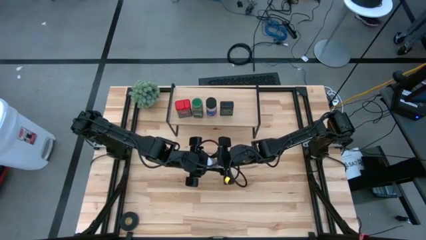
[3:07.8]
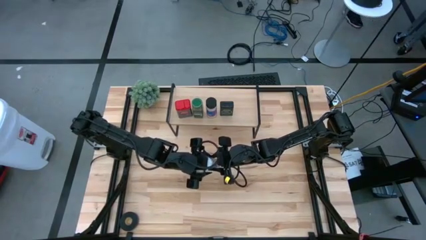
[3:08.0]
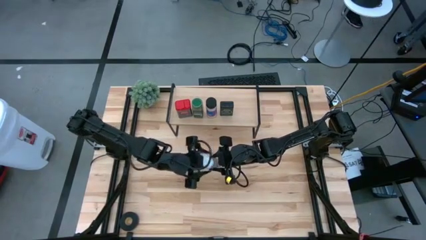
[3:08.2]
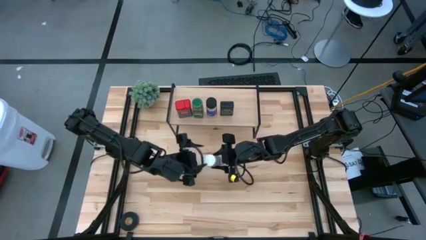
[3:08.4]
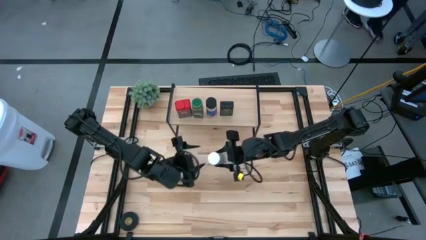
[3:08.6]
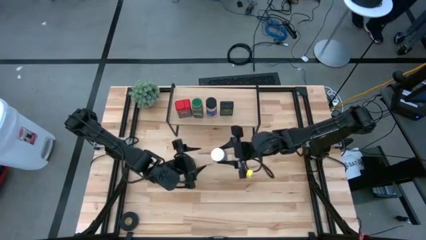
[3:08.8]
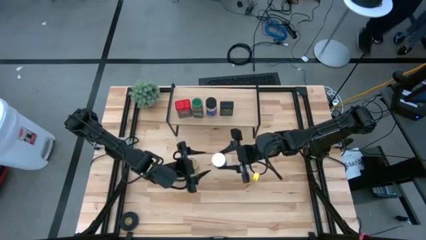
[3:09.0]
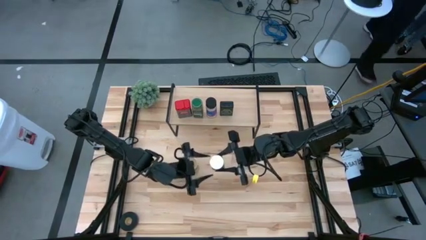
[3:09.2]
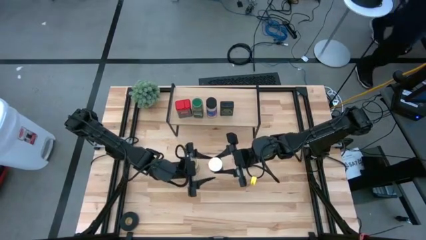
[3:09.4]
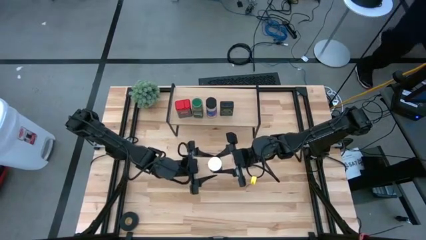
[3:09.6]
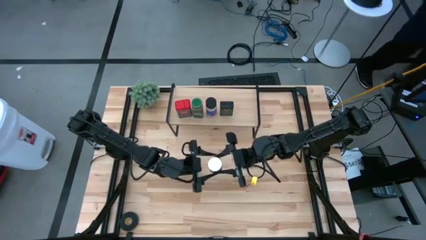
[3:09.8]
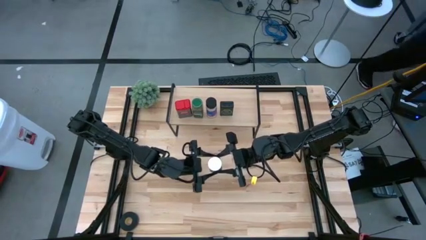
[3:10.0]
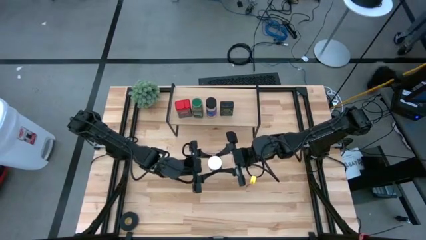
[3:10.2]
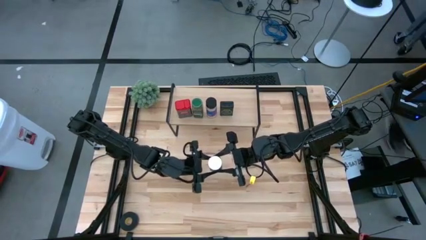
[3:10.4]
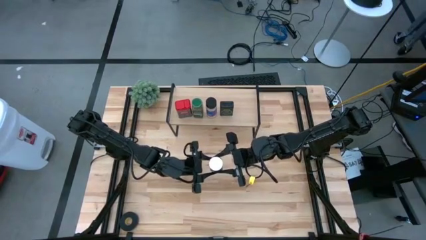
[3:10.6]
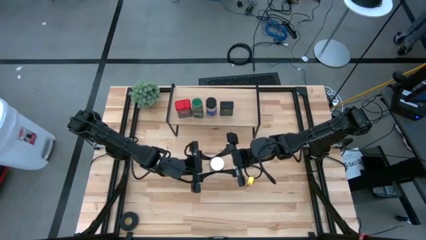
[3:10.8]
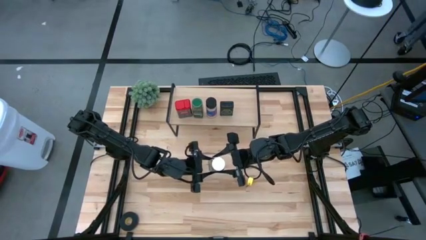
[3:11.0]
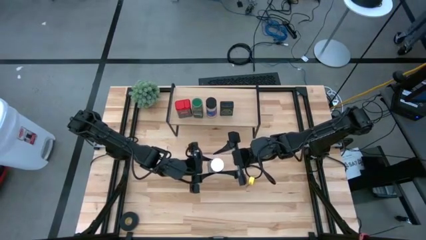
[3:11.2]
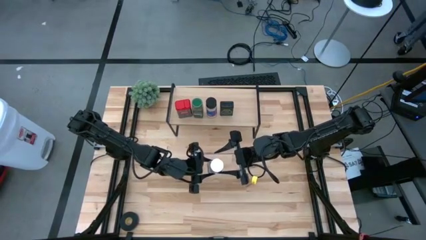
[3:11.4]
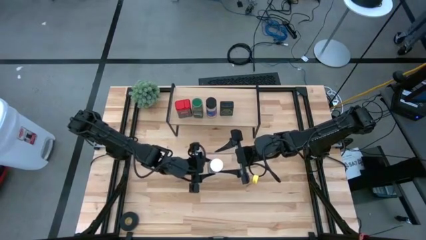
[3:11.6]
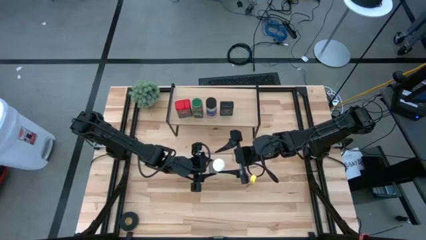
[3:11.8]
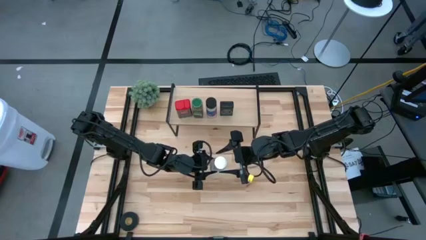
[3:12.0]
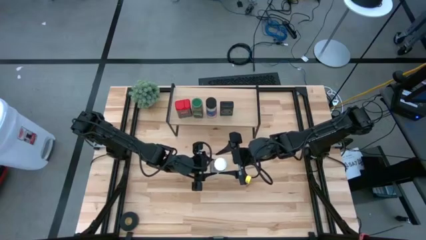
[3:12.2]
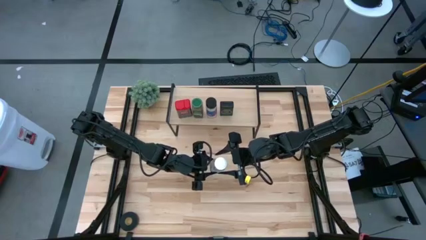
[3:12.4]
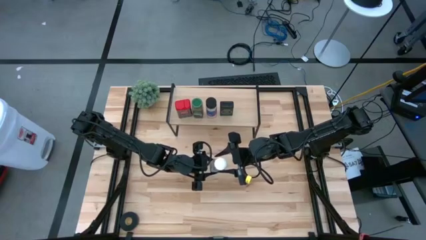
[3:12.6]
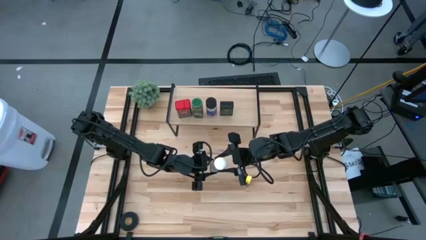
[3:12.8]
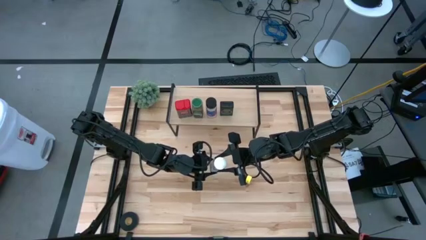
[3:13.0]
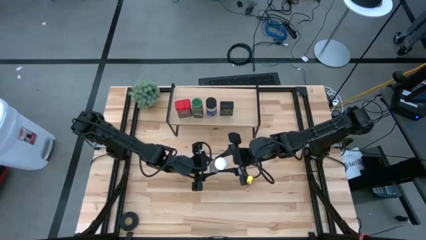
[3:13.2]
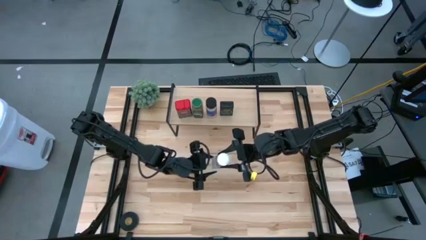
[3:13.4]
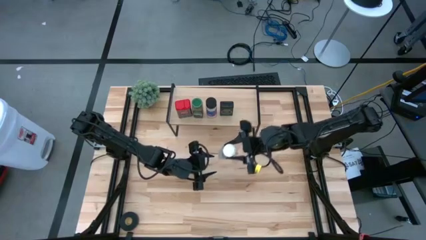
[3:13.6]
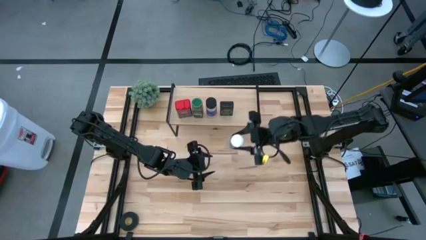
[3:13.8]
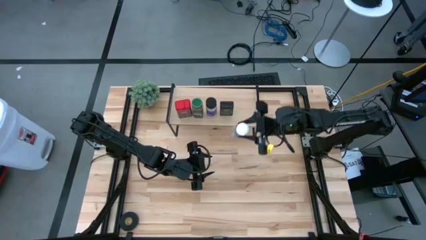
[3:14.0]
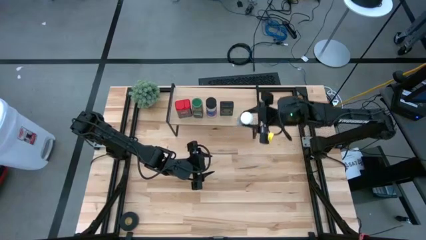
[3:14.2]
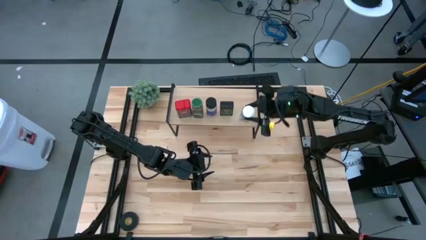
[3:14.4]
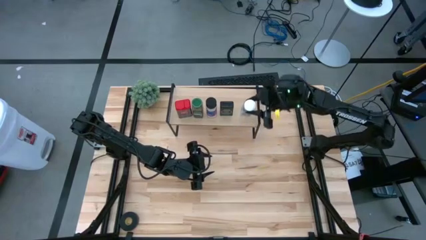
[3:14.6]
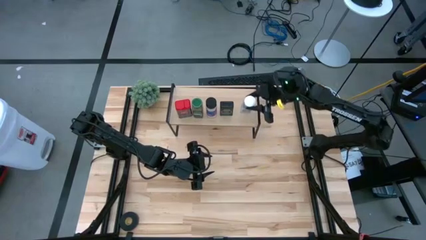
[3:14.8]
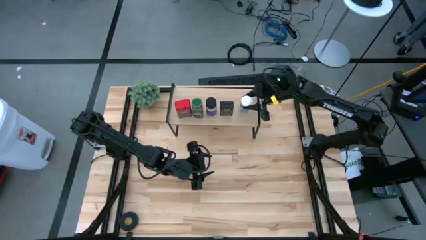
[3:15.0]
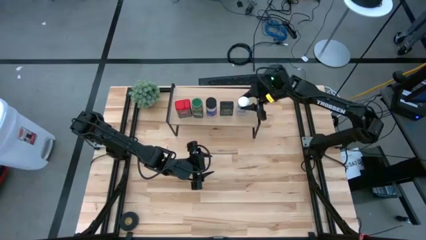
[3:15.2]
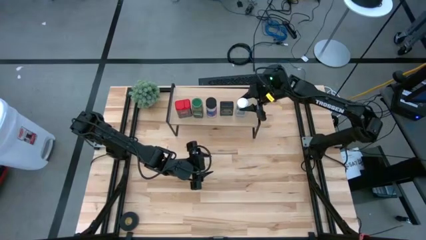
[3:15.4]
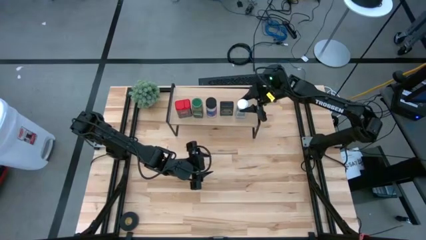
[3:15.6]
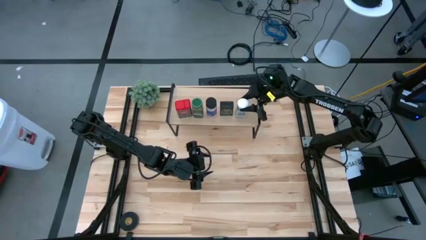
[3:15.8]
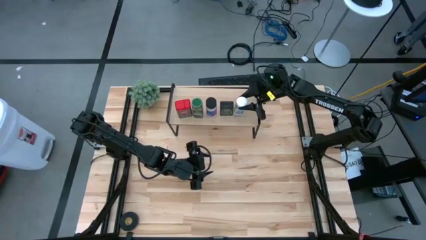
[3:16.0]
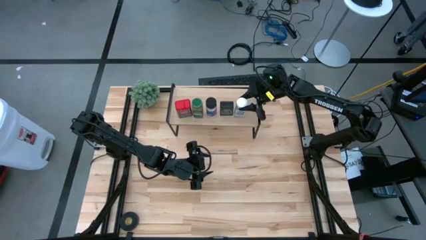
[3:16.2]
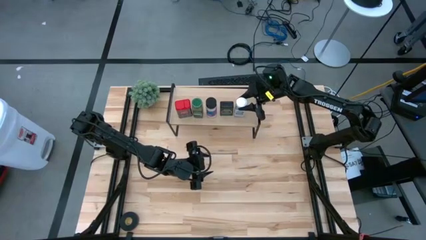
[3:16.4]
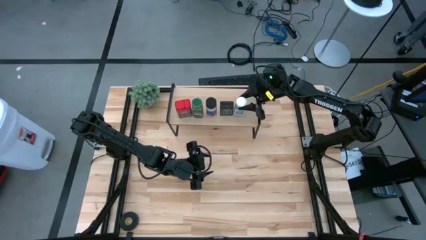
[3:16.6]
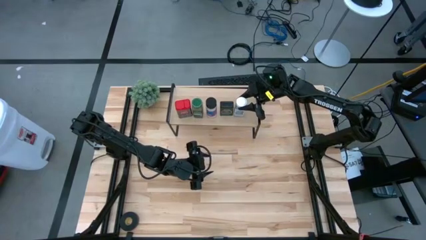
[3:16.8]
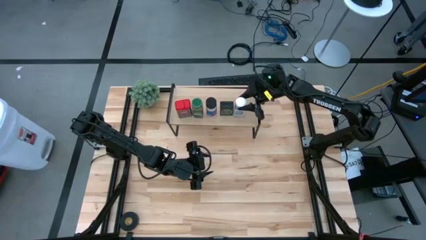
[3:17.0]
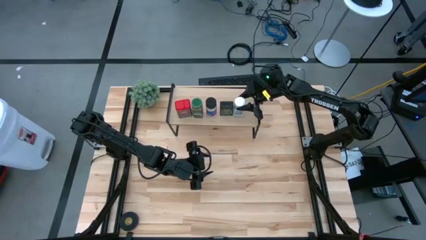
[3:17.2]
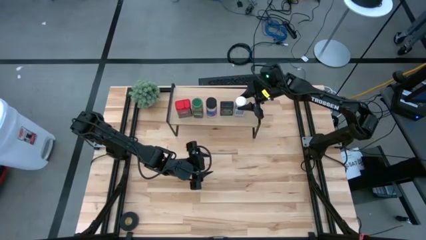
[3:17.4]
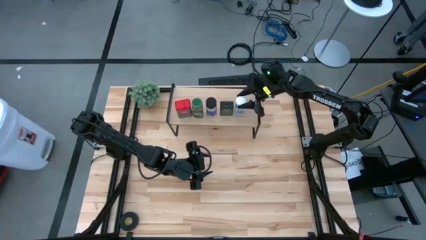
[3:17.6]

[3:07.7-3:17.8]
Task: Shelf spices
Put the white seasoning bottle on the shelf aligned with the other black seasoning can

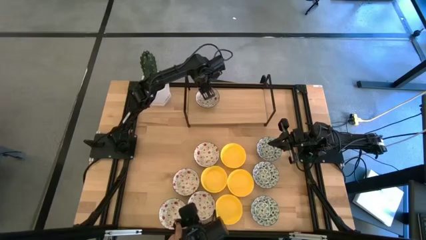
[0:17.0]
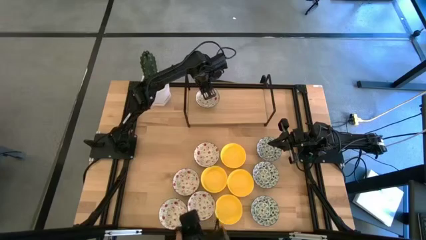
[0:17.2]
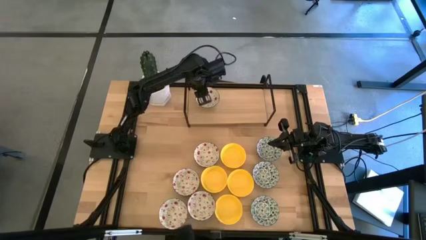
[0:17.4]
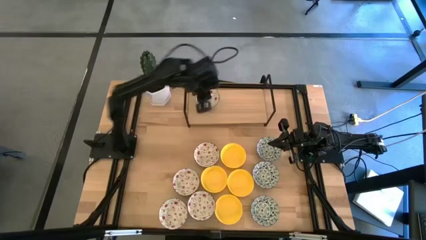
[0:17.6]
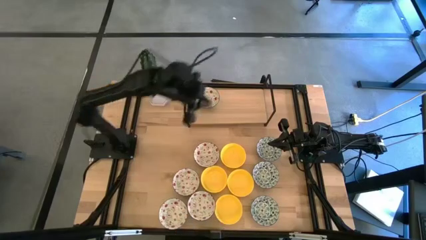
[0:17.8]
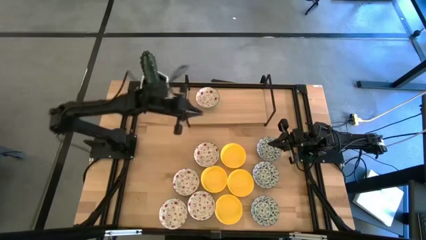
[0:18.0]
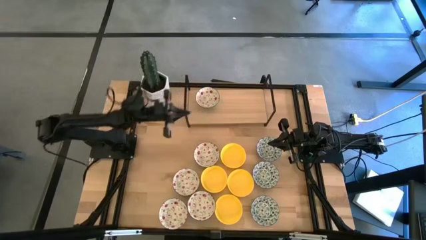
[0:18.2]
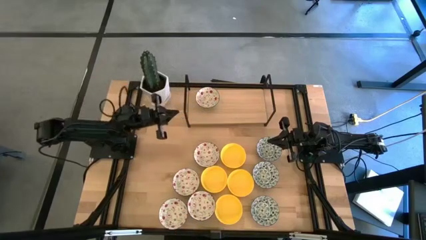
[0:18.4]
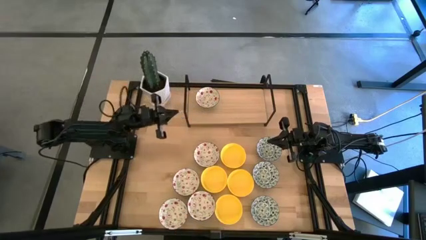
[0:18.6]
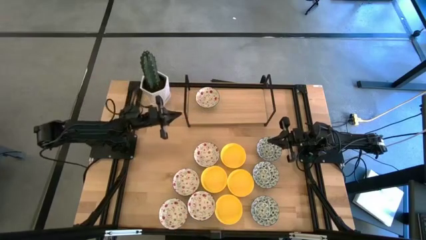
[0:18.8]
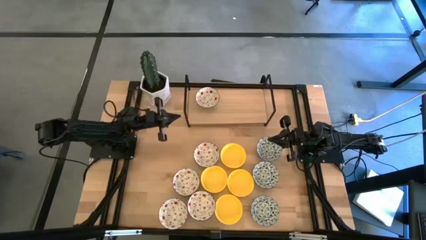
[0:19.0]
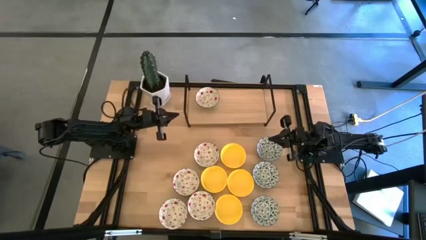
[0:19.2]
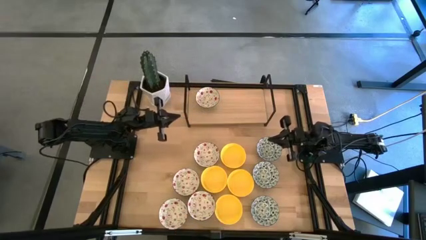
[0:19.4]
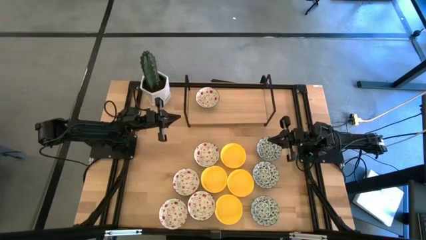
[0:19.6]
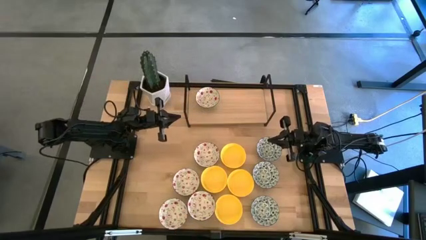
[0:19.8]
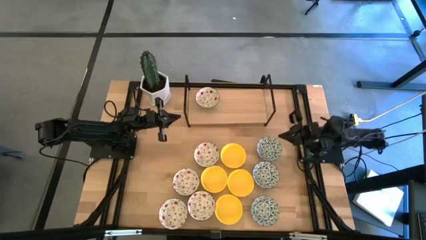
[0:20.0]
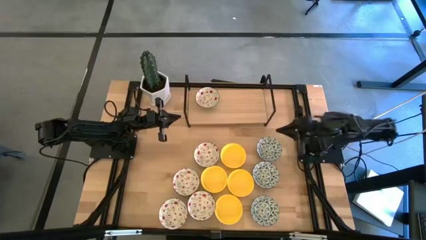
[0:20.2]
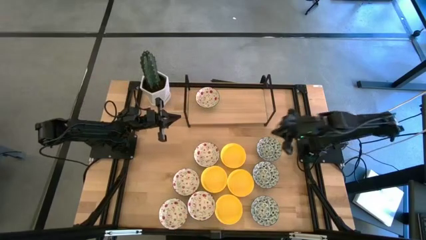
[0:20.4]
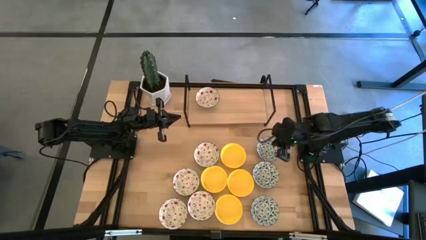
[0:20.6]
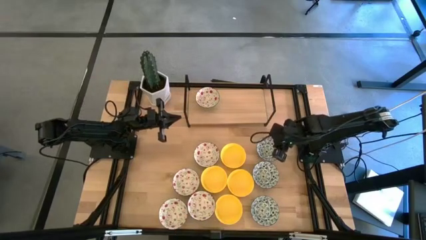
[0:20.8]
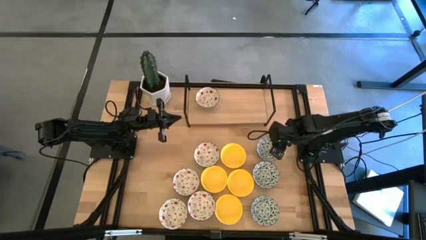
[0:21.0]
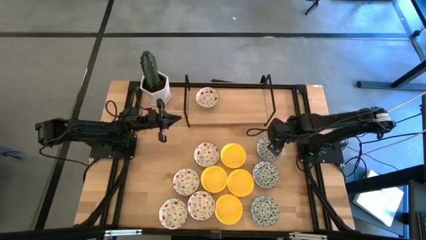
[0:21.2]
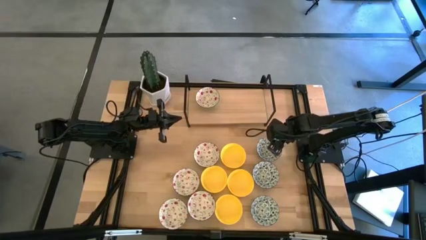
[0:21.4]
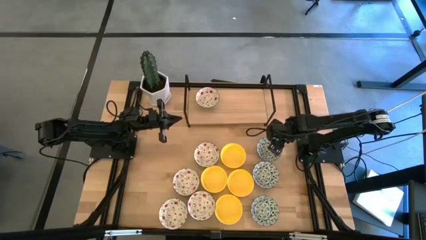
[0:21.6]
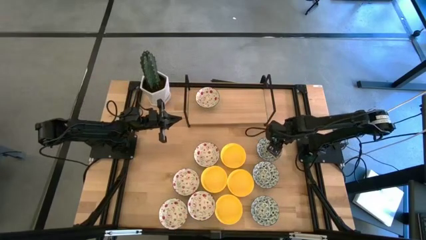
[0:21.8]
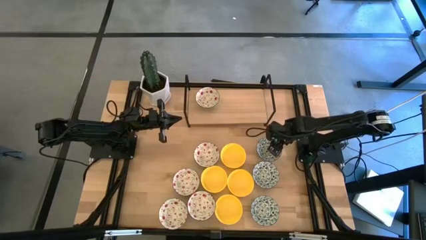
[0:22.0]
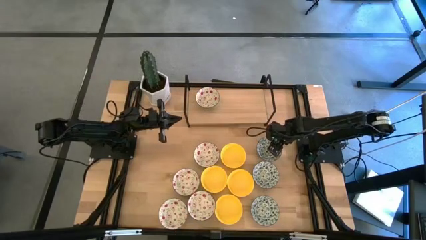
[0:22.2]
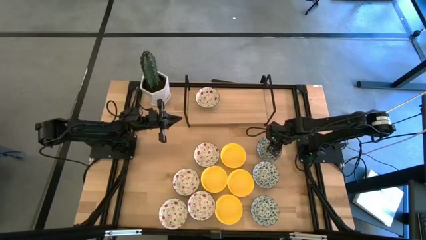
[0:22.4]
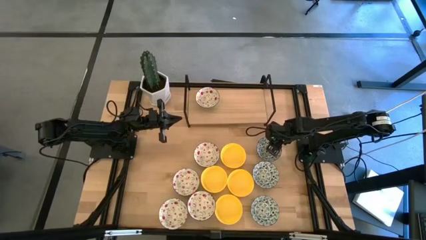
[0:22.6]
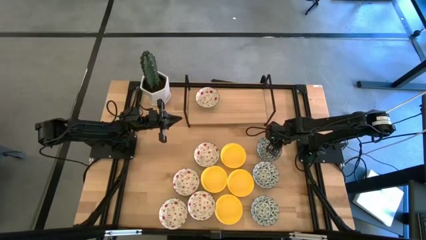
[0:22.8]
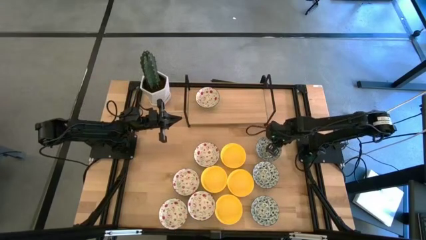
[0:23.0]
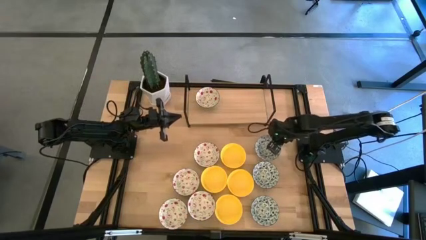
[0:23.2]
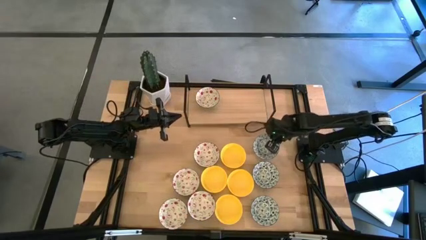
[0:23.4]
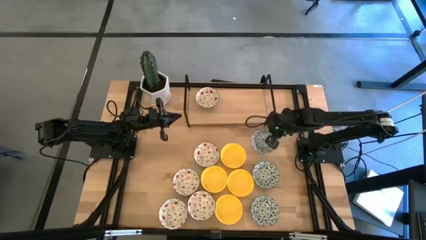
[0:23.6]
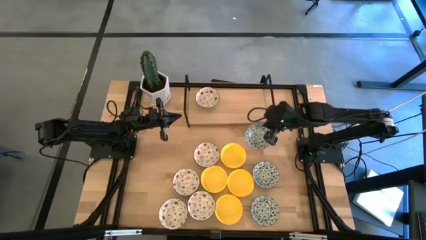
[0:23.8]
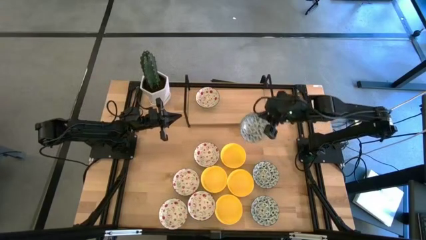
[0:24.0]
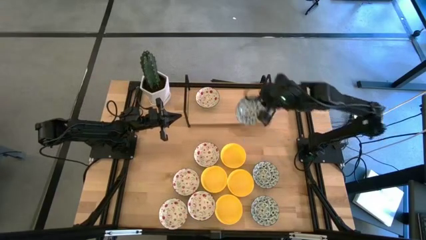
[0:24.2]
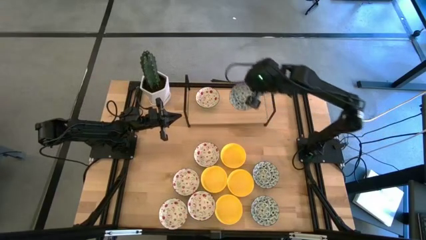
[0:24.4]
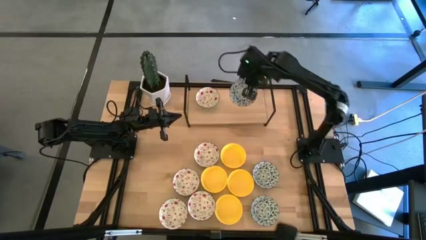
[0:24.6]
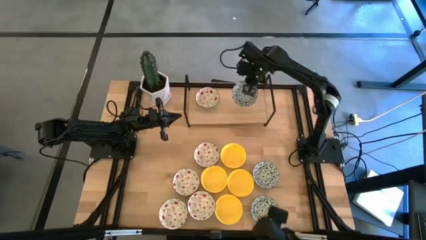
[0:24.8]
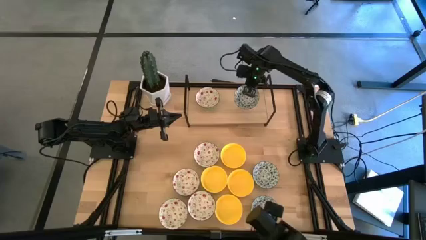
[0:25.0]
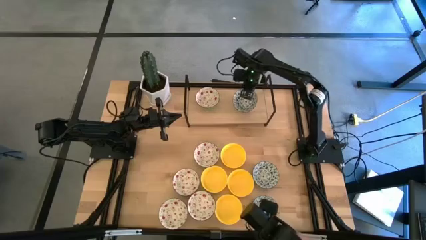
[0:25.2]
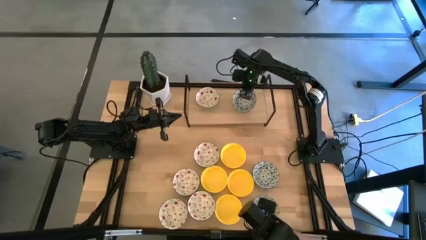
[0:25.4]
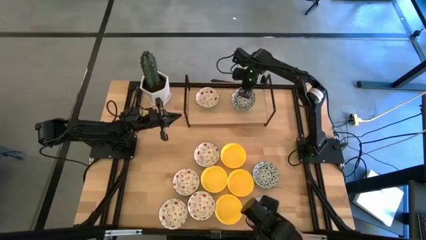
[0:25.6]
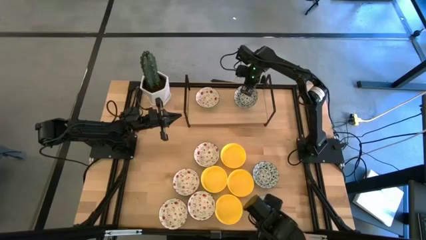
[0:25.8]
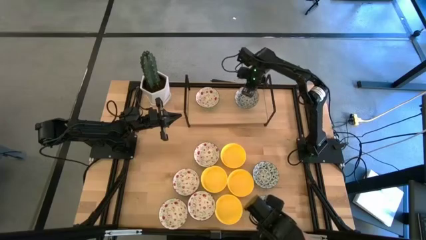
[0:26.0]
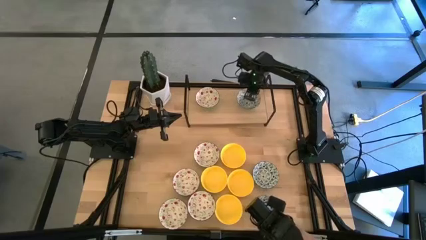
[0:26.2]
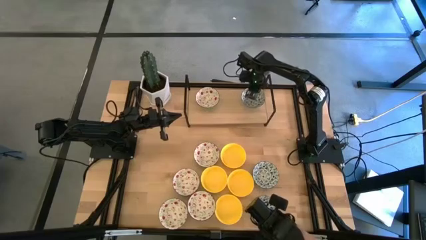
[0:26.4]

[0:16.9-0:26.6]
Task: Pick & Place Mini bowls
Put the blue bowl on the shelf
